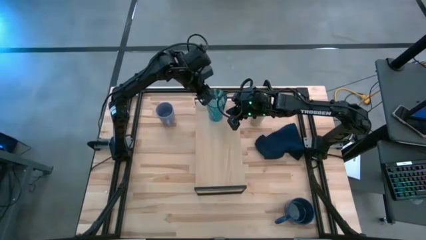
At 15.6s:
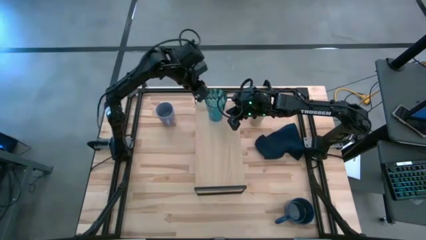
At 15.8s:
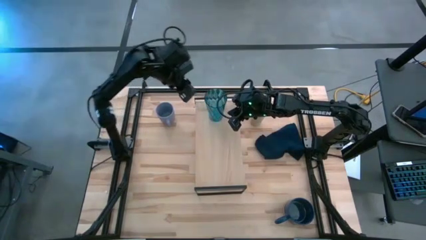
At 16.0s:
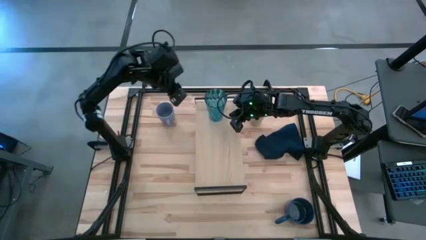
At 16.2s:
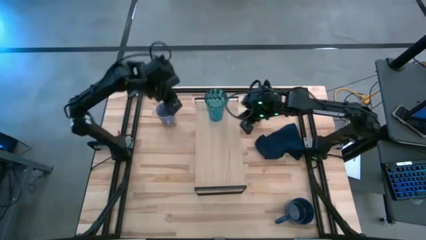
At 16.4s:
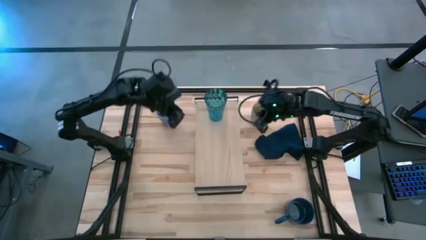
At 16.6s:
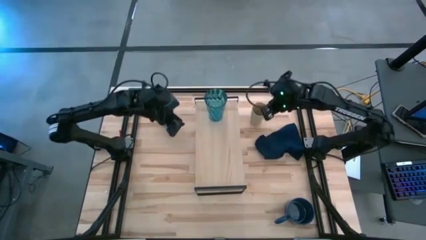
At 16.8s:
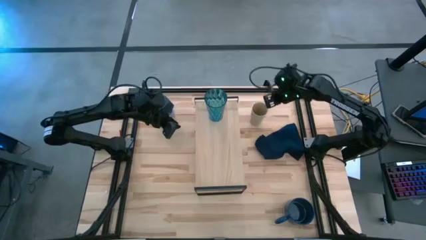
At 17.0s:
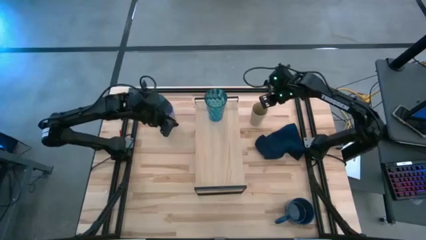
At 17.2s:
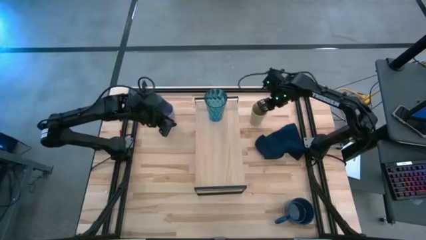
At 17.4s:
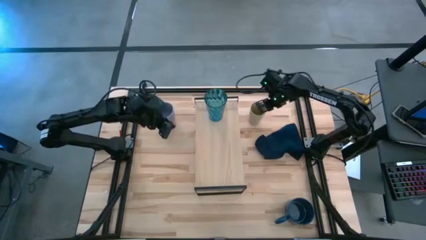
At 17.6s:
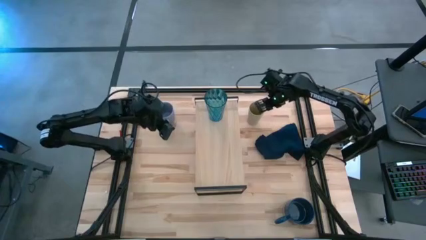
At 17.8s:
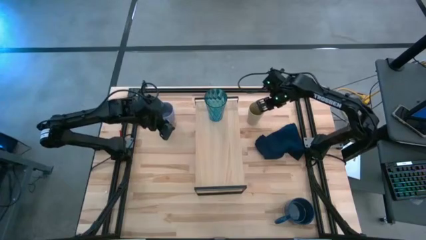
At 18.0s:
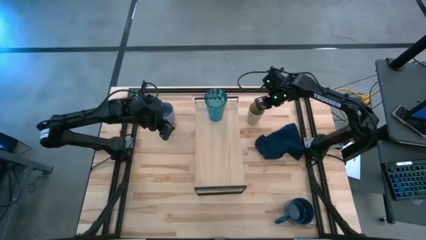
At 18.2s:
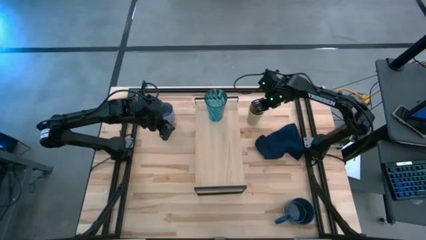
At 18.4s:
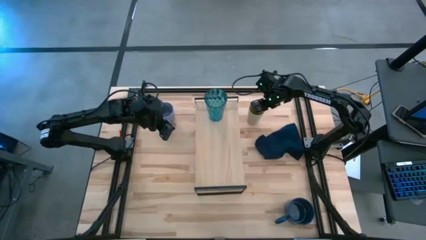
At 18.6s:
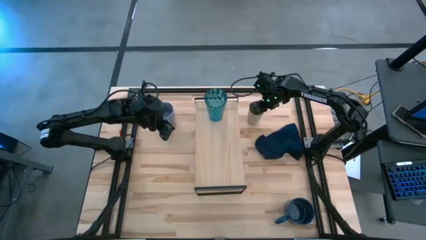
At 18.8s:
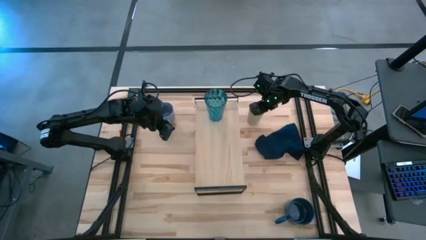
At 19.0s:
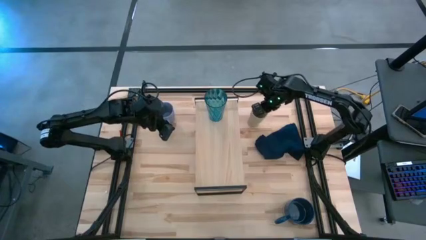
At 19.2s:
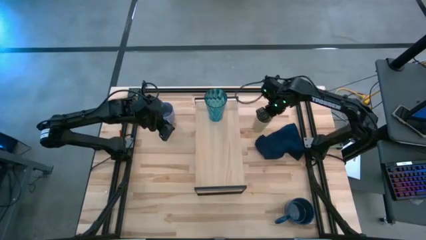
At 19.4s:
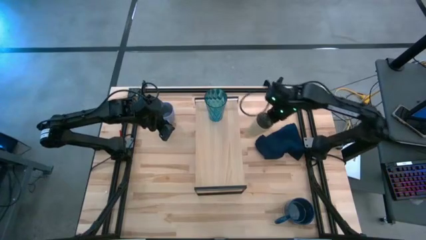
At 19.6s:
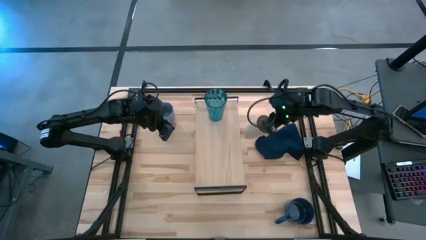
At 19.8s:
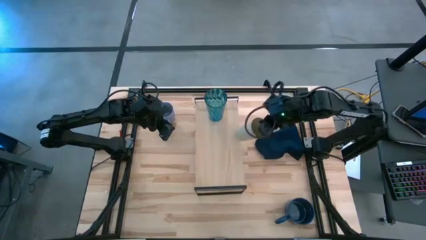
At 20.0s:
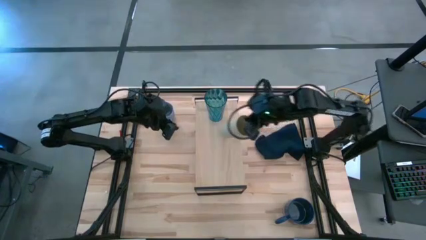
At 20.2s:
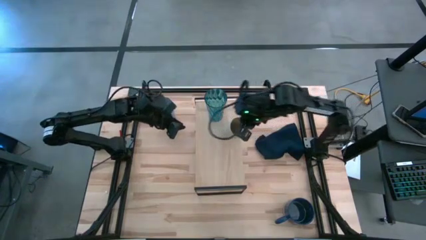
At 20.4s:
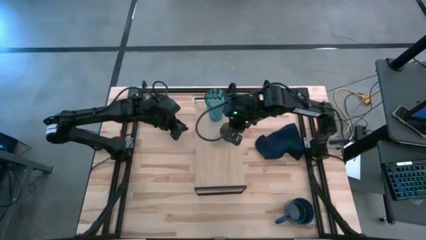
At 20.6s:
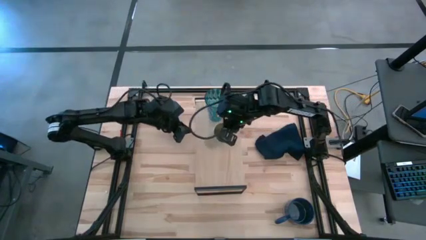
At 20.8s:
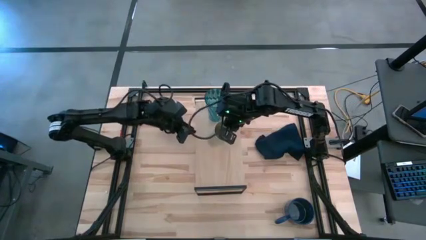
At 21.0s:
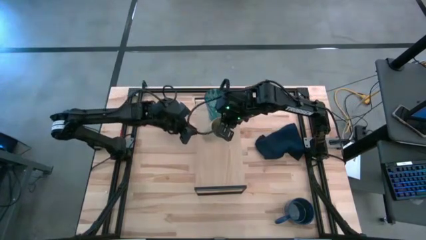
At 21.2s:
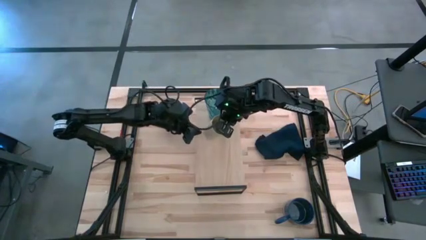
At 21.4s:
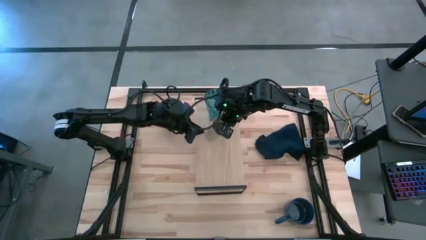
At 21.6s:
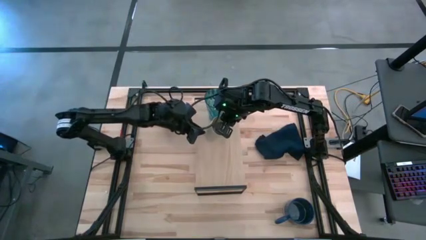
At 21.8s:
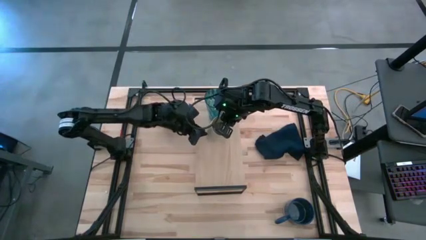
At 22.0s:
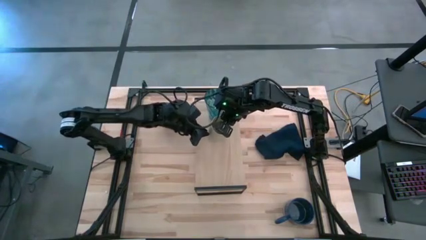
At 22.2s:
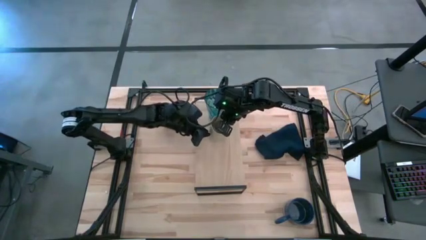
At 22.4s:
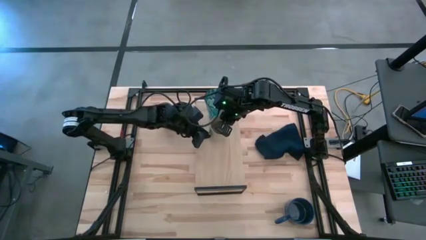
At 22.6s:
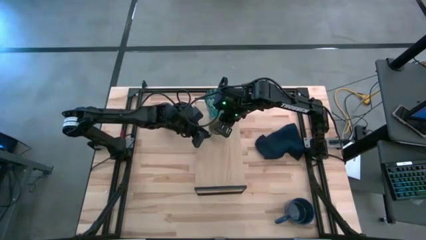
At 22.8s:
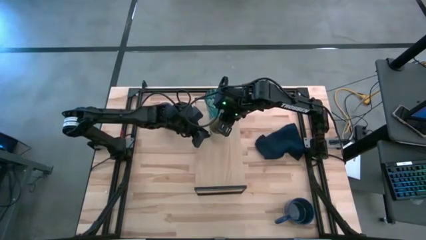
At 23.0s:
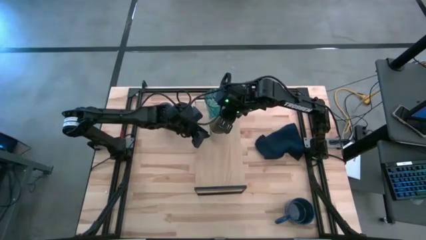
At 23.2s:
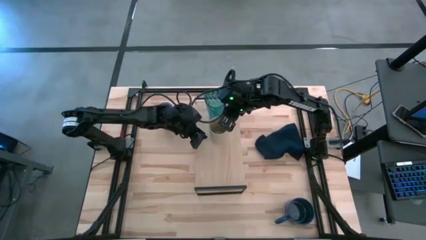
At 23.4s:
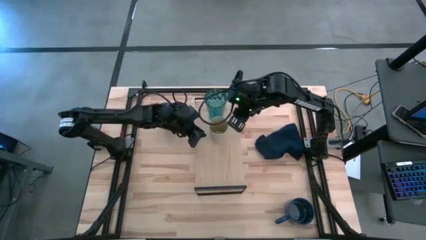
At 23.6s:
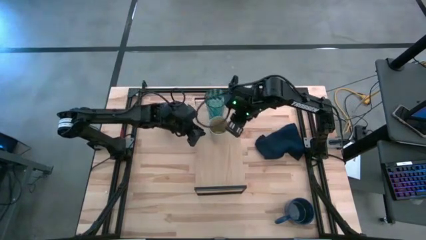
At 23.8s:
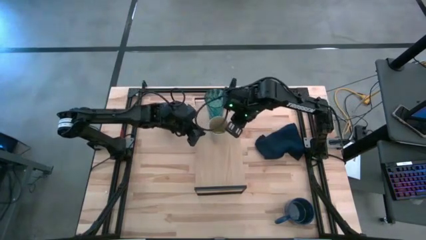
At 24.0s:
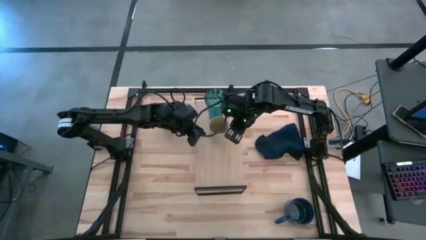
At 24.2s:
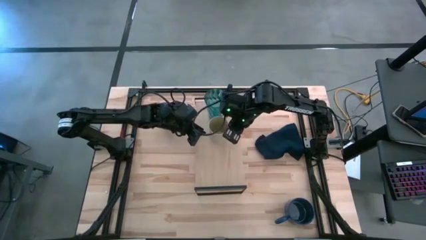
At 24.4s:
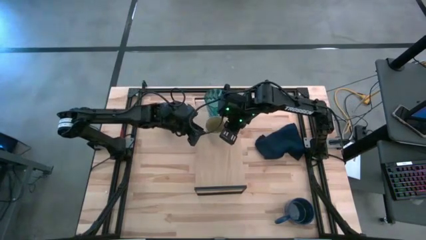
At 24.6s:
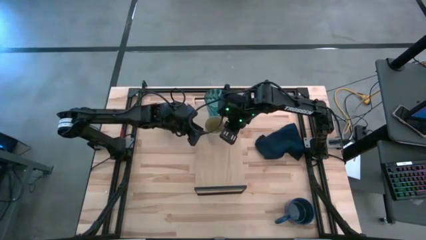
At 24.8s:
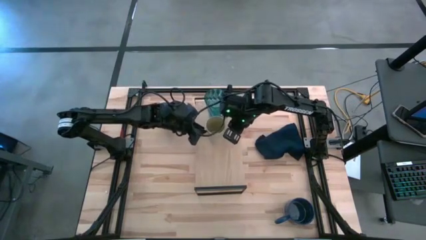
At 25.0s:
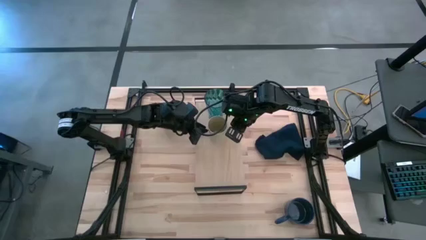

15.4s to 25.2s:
Task: Stack small to large cups/mugs on shelf
Put the gray cup on the shelf

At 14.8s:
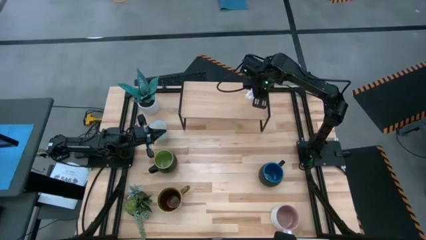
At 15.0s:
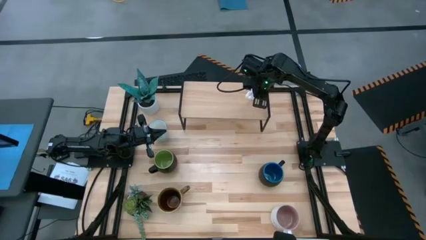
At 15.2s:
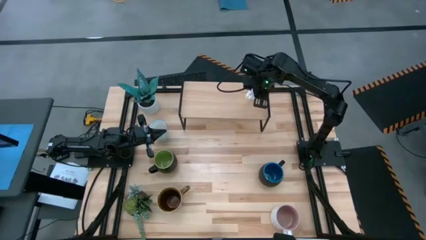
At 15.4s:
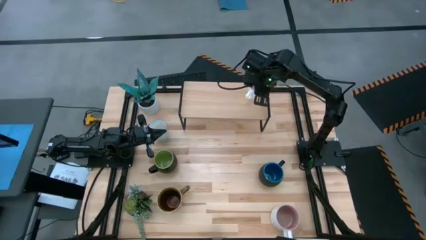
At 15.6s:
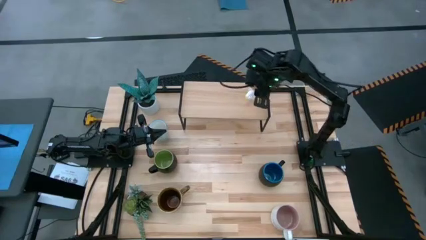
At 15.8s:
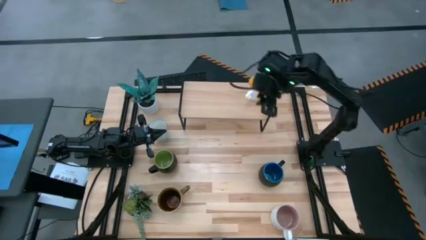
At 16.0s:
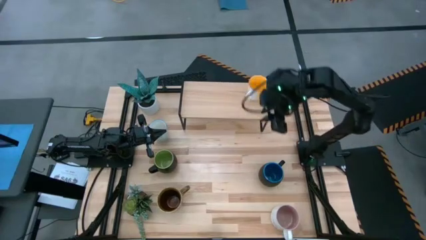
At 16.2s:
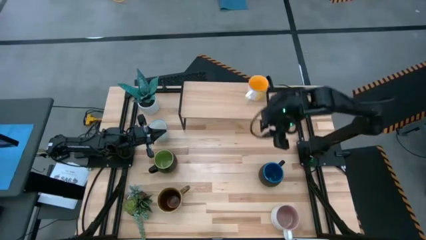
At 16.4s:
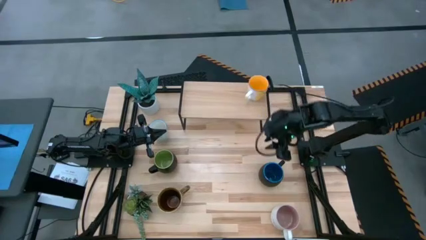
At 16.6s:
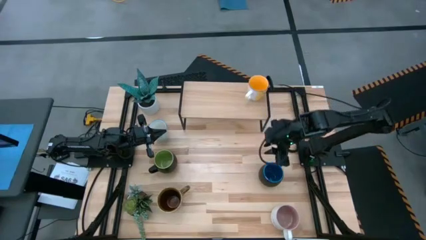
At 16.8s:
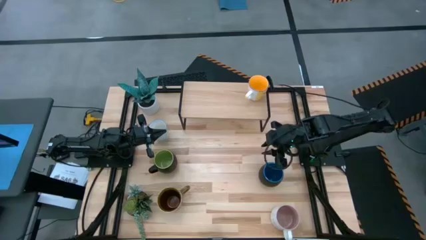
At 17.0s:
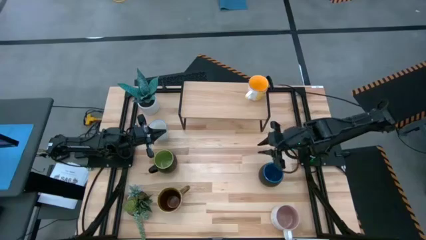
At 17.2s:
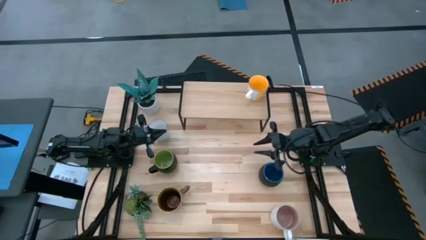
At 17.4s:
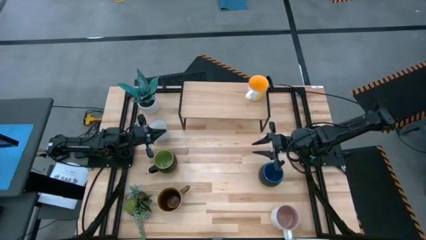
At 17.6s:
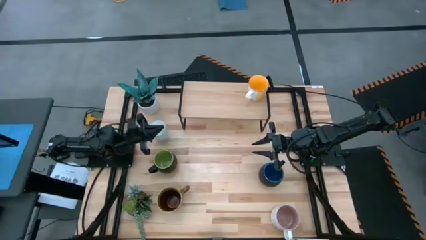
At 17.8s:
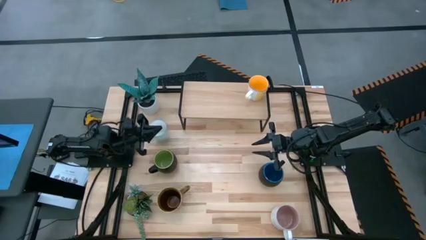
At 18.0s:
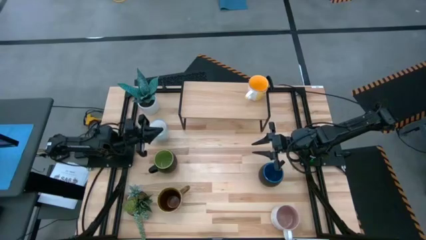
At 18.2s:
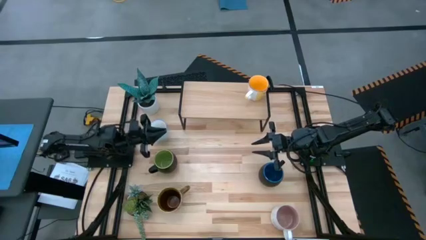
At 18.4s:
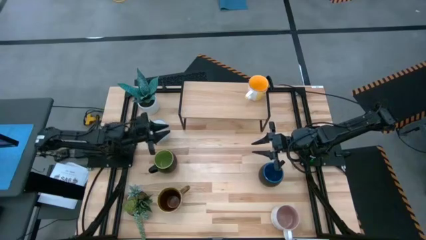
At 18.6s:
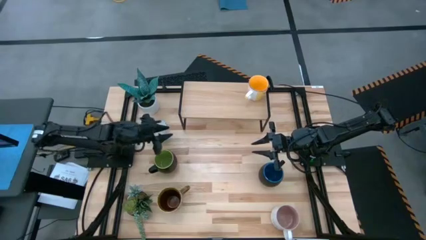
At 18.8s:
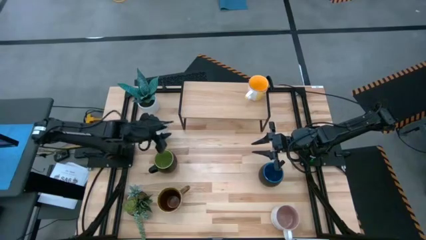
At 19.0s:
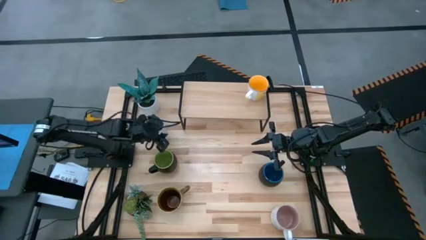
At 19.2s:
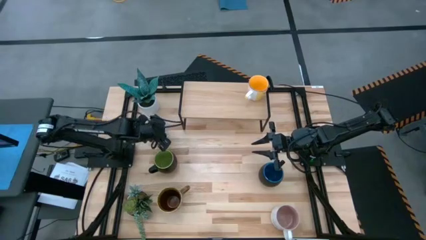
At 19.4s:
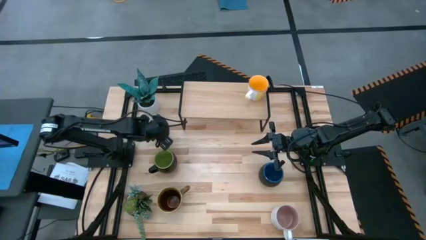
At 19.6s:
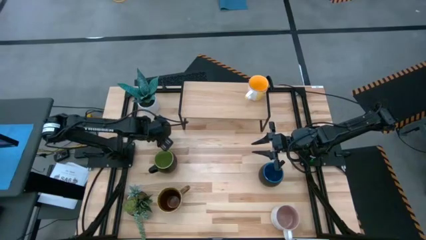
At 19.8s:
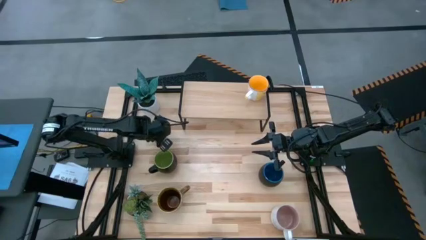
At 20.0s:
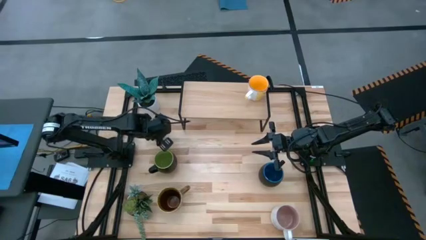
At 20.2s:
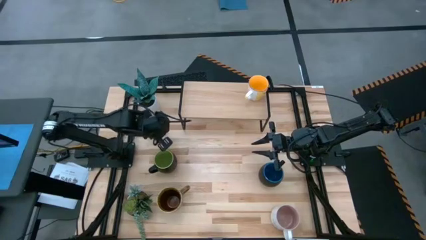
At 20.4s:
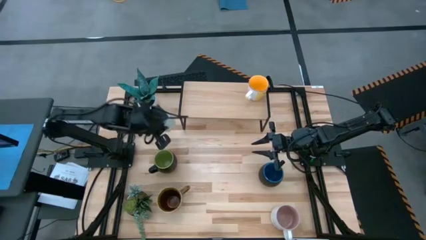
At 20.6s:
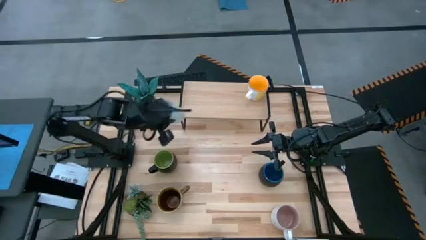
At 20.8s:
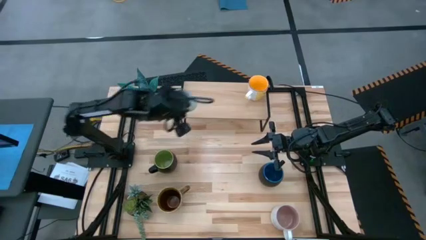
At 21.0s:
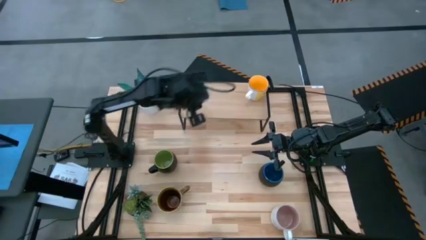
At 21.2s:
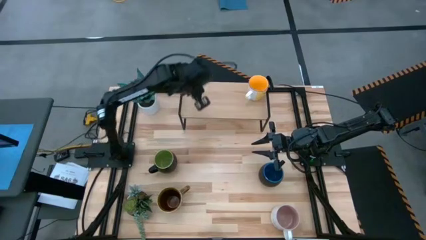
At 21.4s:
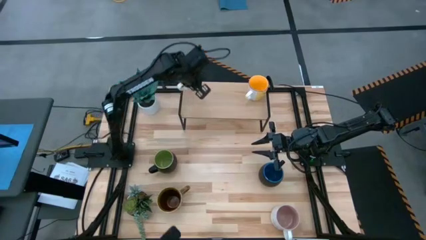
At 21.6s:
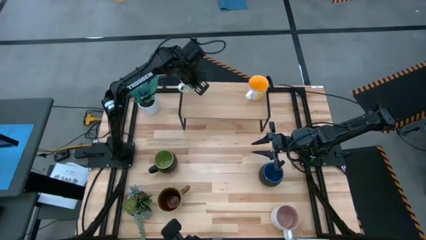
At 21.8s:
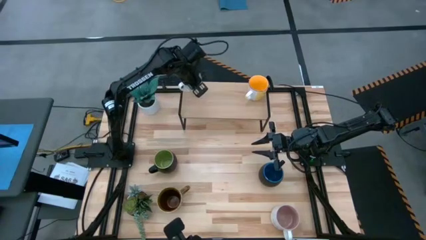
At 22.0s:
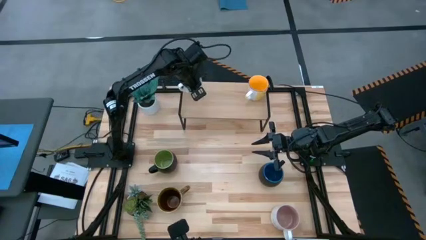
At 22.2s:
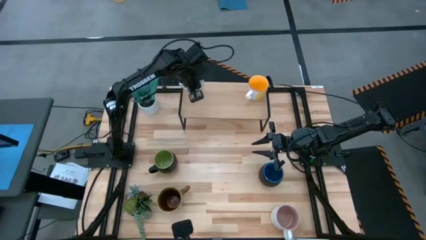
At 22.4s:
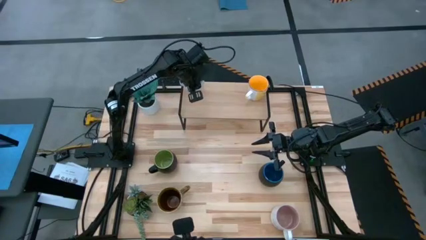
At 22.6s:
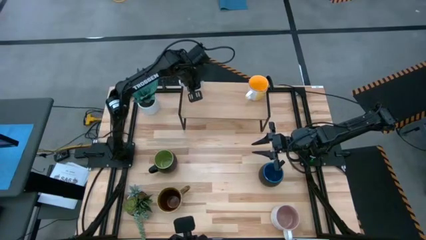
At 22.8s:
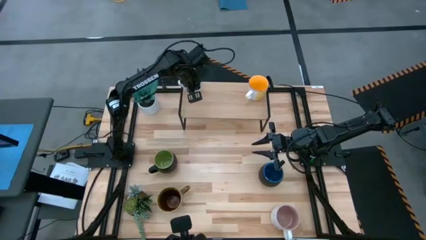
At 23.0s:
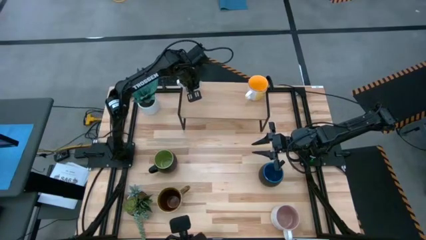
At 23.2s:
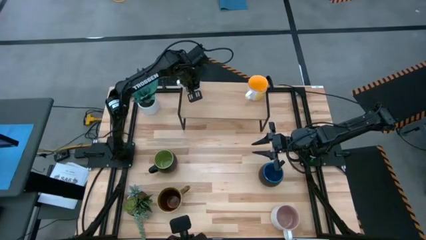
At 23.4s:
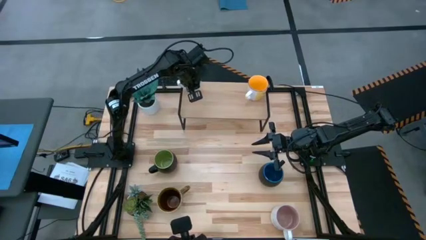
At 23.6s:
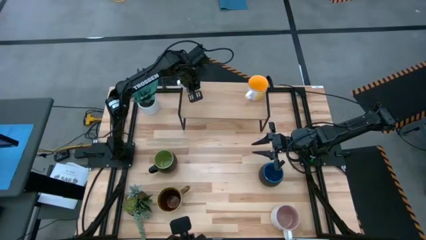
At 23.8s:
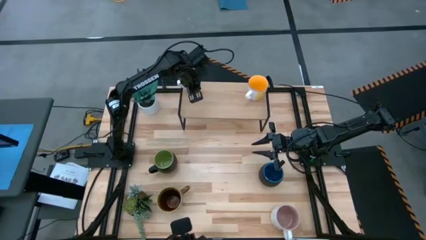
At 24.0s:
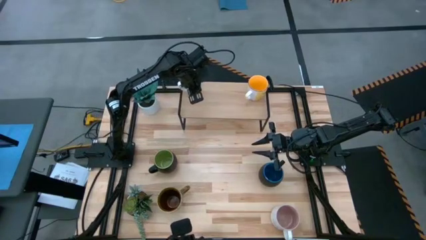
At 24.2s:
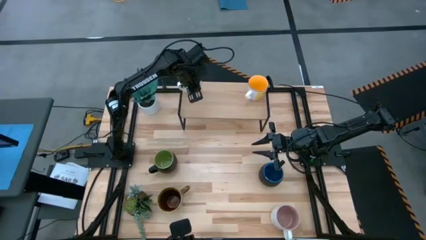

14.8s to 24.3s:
Task: Place coffee mugs
Put the gray patterned mug on the shelf
